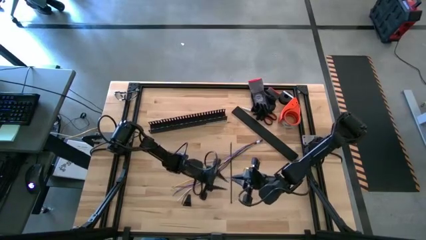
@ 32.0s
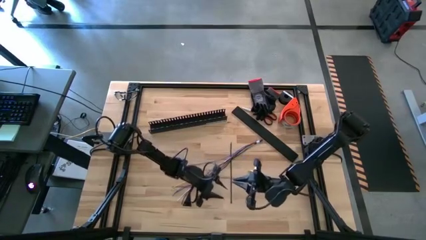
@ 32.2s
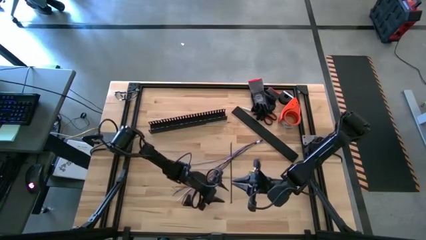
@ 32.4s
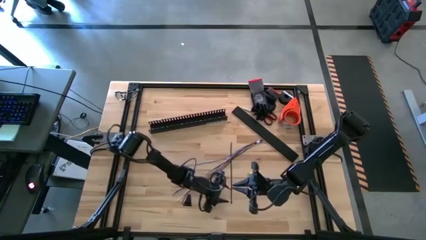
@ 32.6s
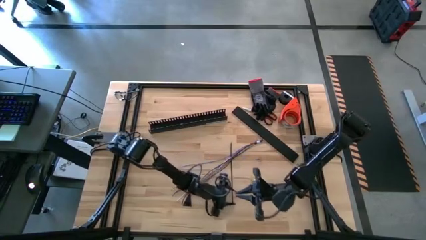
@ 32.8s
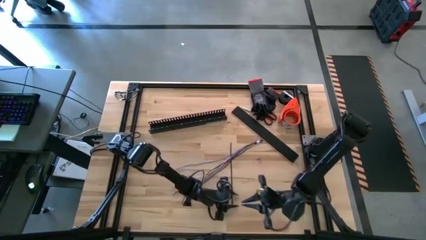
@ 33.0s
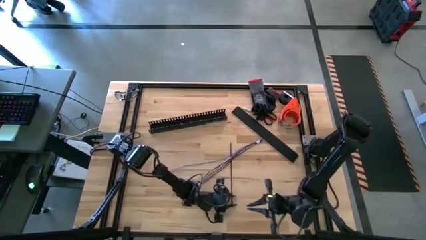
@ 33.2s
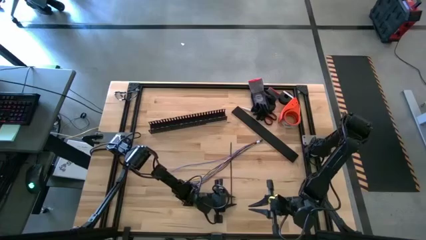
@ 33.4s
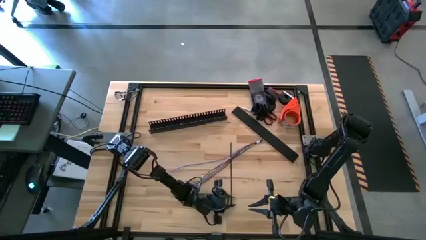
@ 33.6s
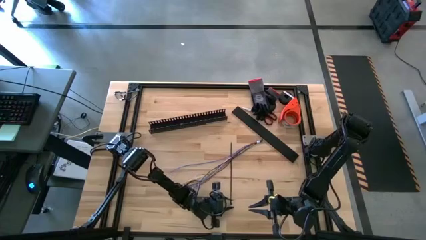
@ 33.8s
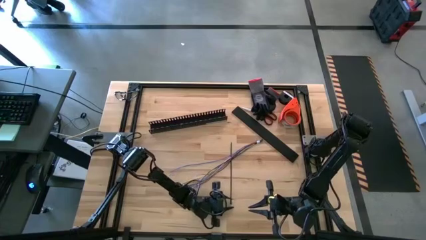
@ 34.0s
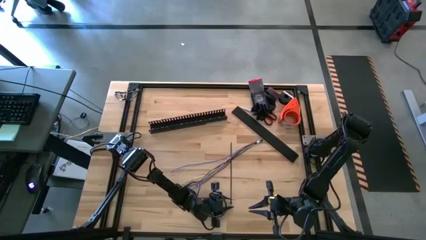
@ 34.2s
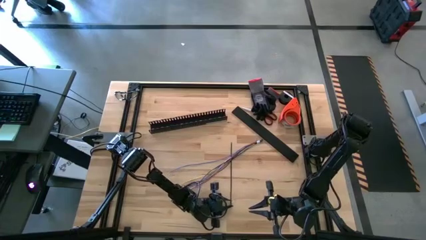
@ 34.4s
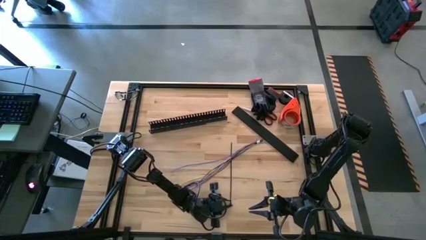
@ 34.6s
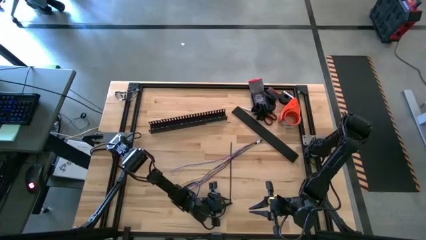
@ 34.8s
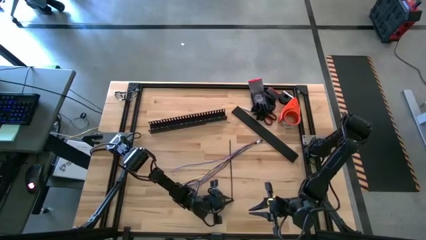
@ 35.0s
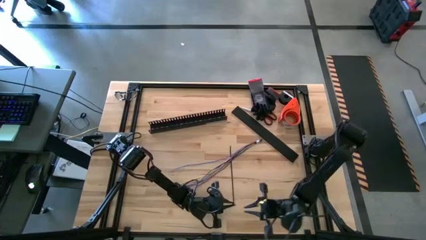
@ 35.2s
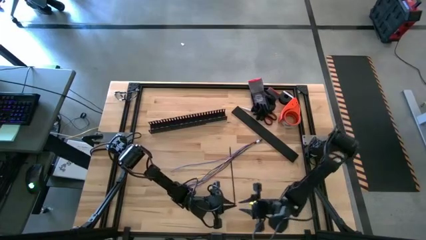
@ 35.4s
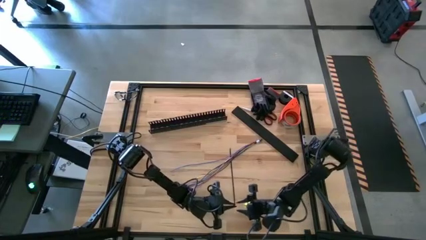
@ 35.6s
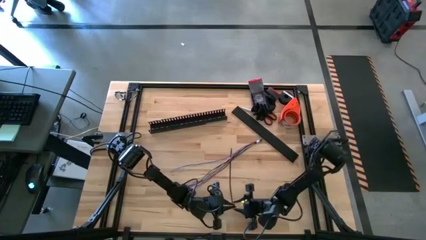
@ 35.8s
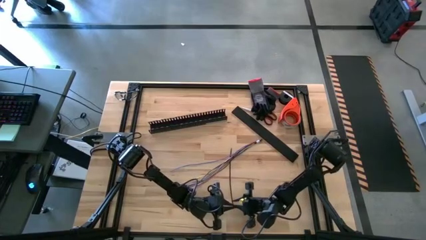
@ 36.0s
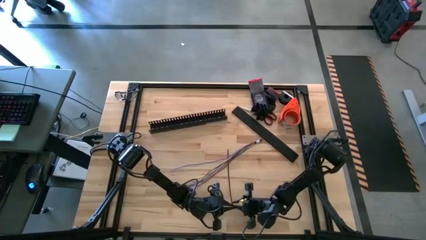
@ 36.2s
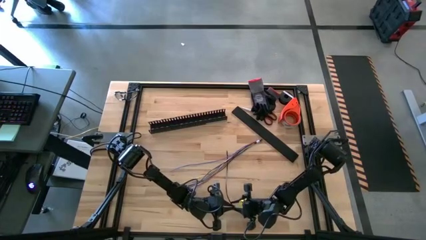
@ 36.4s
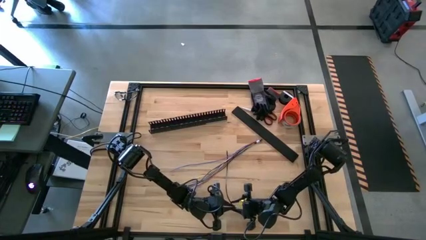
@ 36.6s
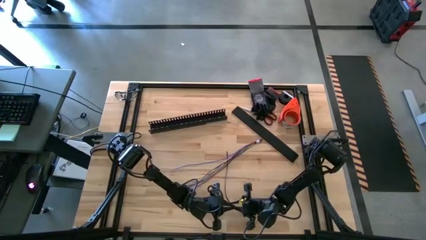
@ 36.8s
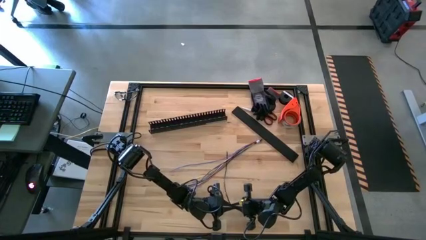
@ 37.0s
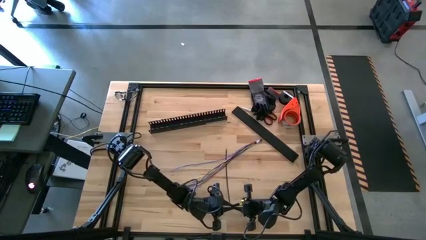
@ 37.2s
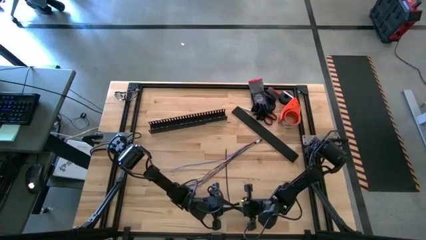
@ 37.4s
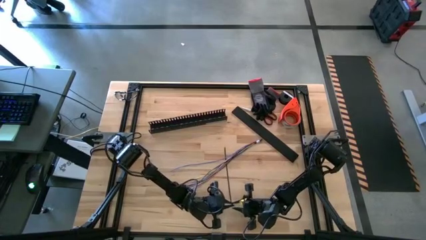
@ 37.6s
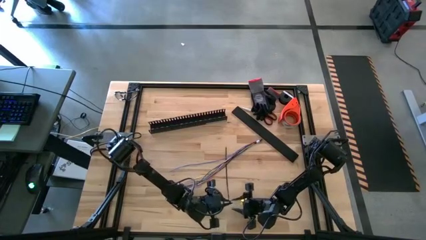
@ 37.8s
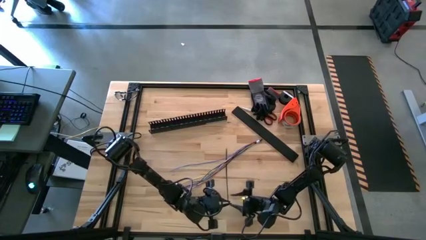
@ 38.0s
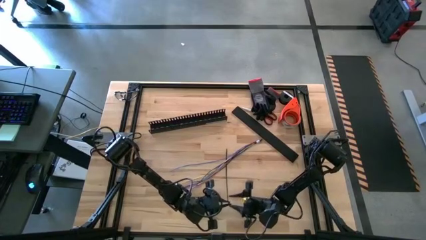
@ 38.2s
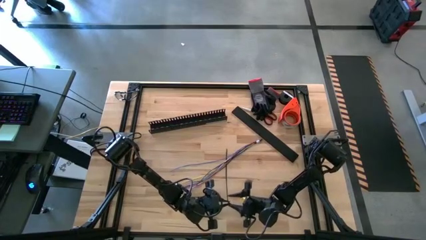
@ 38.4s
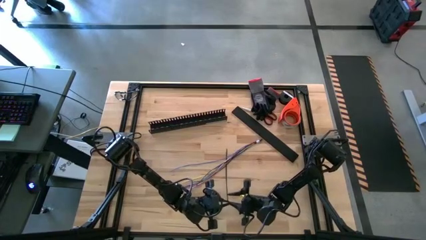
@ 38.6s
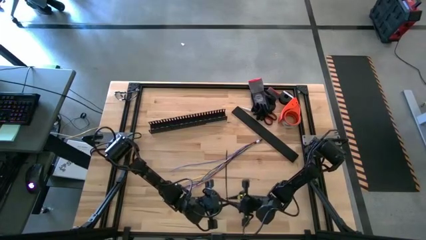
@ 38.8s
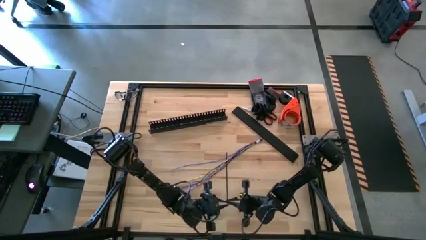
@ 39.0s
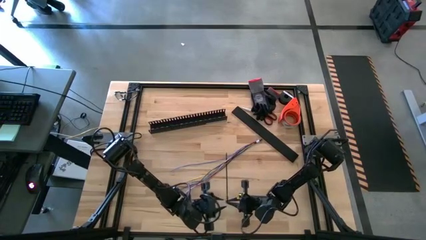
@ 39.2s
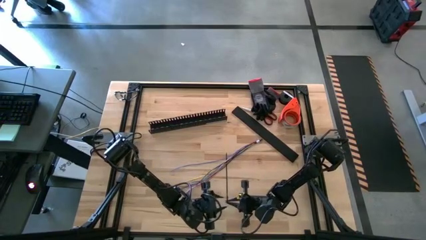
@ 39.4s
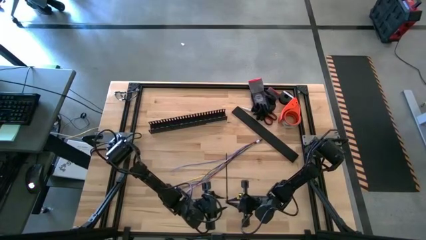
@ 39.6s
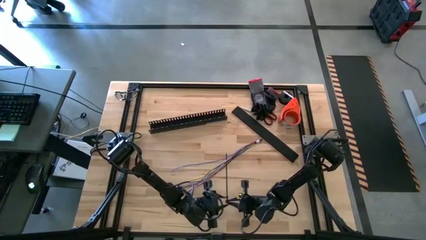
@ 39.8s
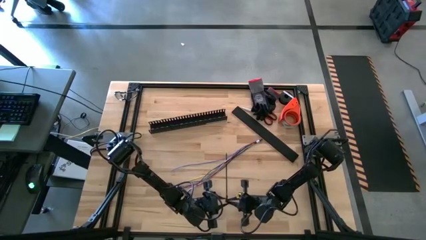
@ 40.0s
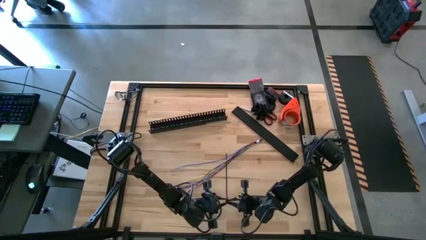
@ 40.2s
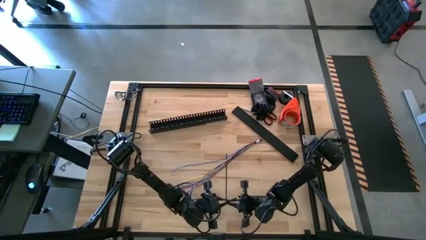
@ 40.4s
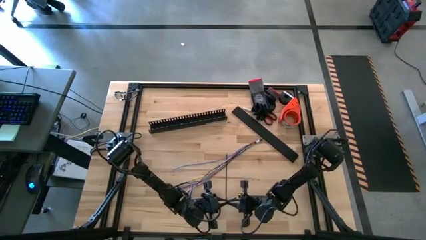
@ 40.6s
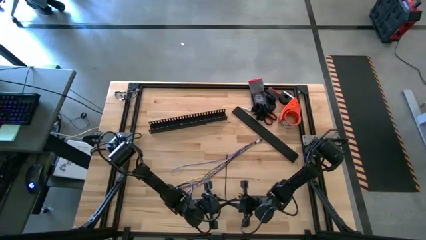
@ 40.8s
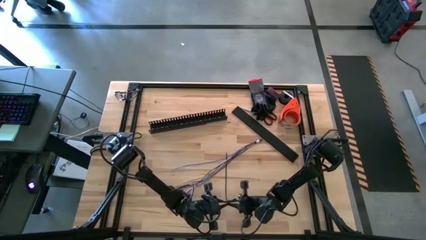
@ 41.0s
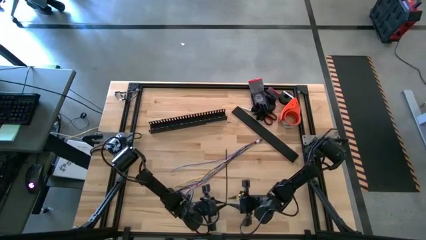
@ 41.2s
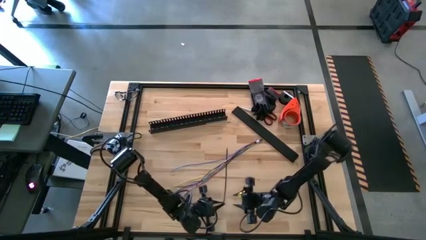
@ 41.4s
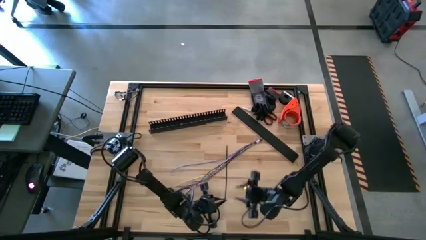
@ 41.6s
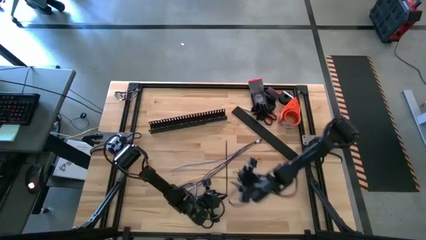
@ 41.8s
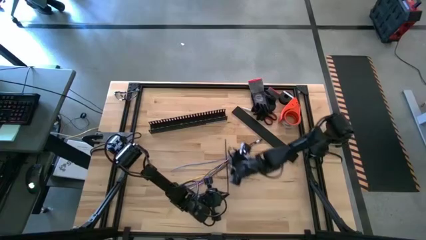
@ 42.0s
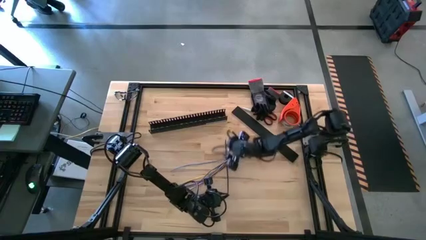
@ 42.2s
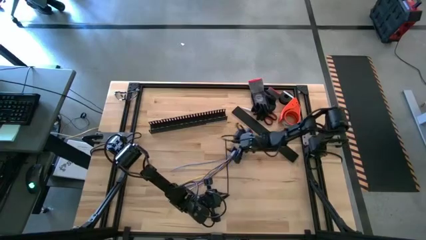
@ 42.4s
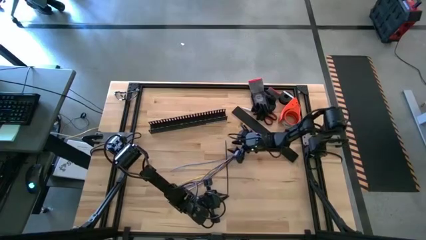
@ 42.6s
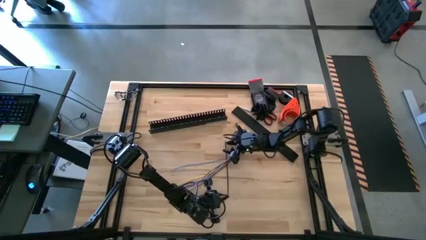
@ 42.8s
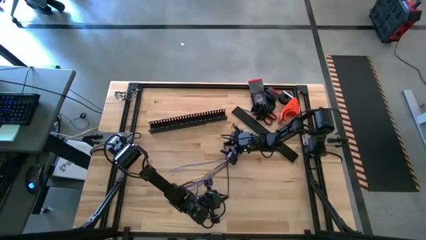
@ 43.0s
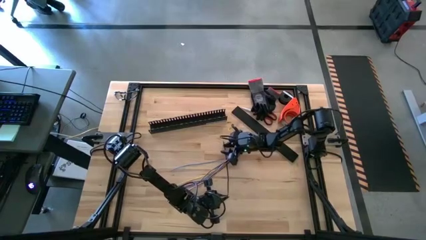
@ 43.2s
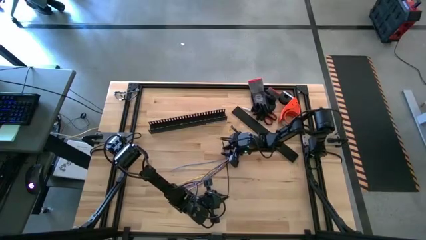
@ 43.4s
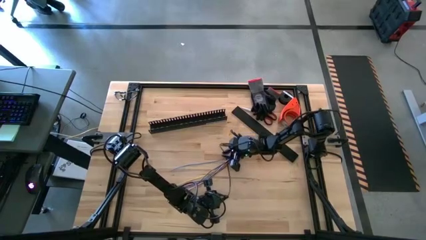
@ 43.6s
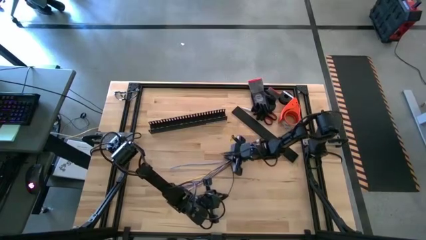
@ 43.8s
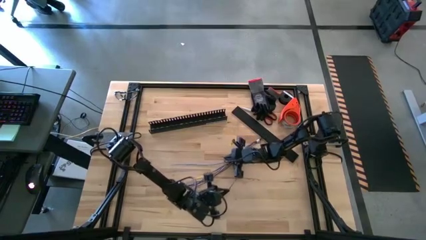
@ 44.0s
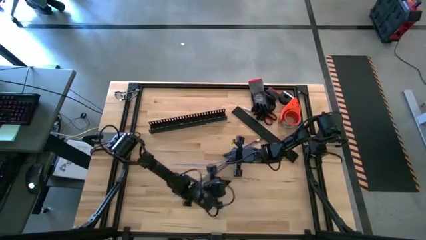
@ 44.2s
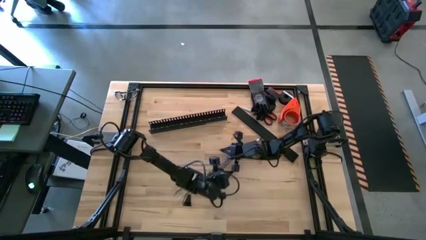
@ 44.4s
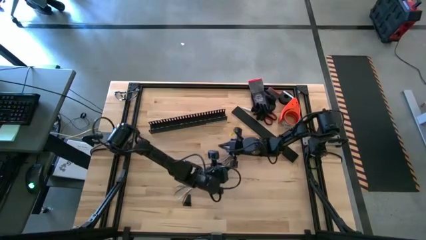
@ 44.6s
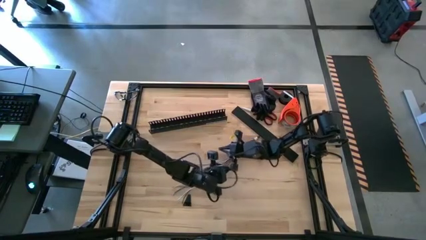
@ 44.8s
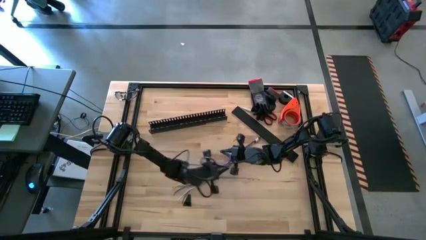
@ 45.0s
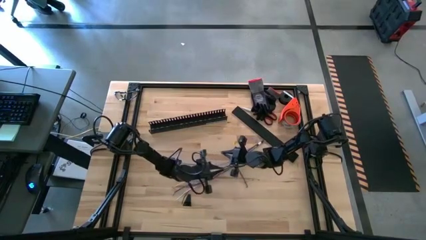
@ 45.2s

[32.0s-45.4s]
Task: Ziptie cables
Wrap the colored cables together using a zip tie

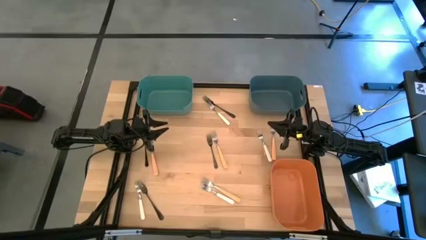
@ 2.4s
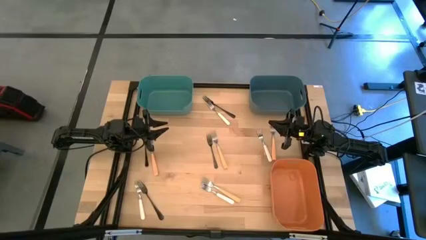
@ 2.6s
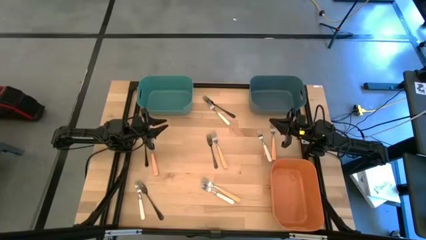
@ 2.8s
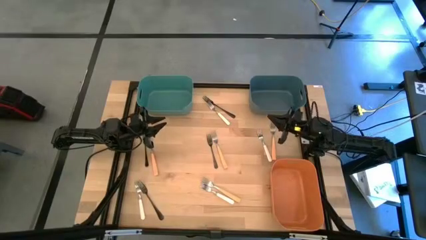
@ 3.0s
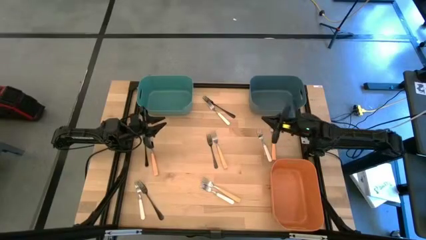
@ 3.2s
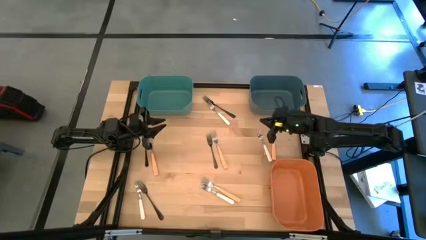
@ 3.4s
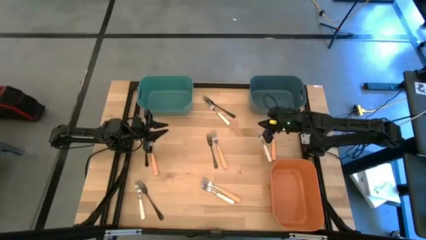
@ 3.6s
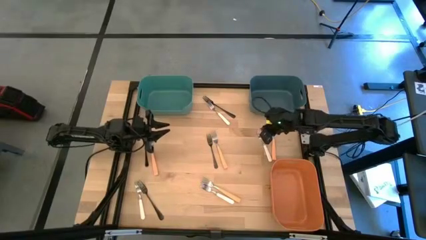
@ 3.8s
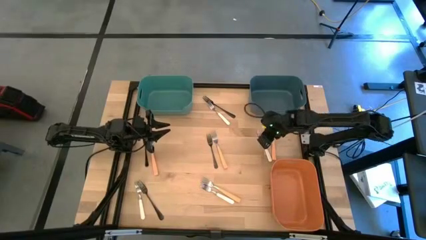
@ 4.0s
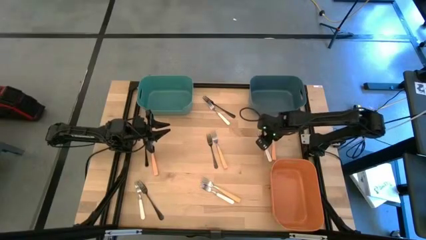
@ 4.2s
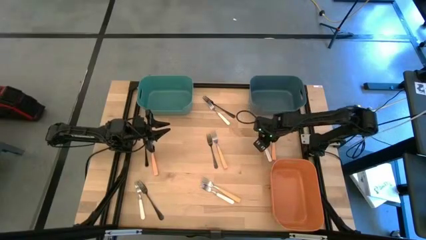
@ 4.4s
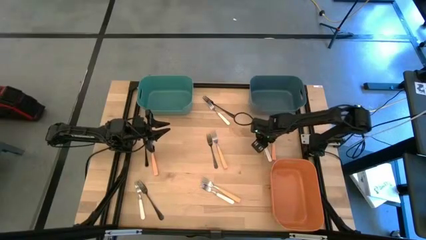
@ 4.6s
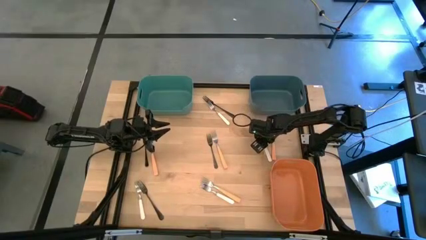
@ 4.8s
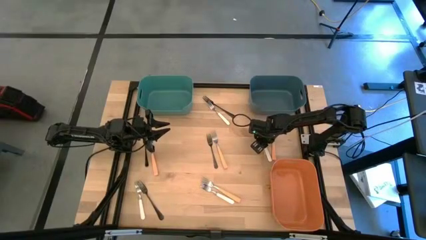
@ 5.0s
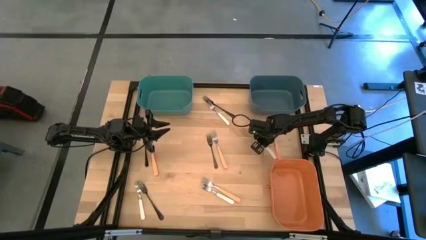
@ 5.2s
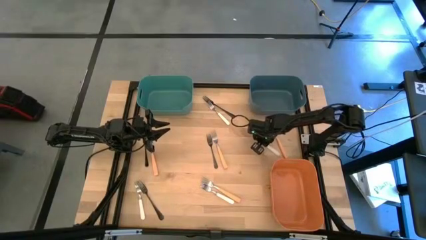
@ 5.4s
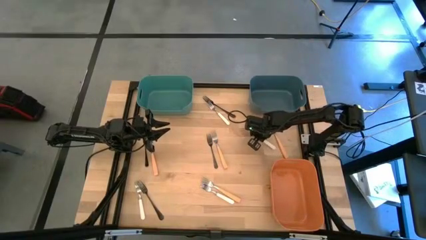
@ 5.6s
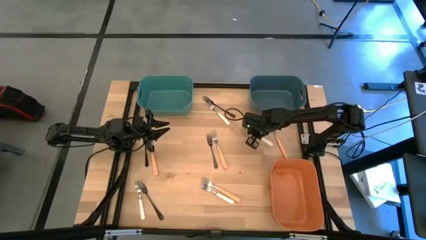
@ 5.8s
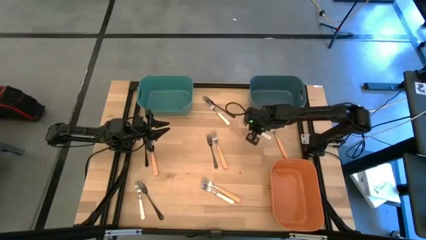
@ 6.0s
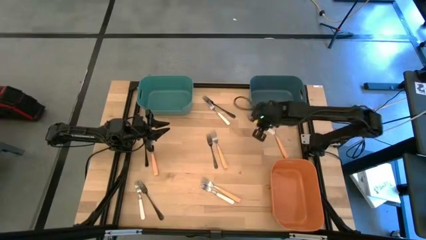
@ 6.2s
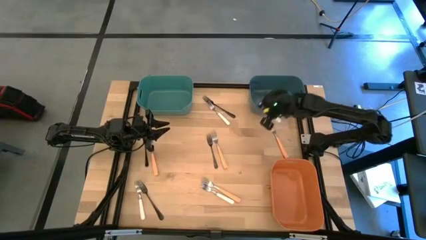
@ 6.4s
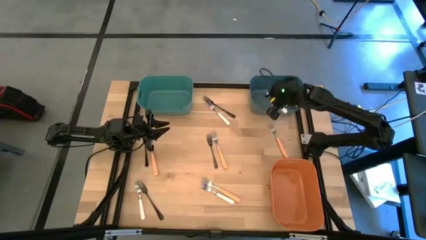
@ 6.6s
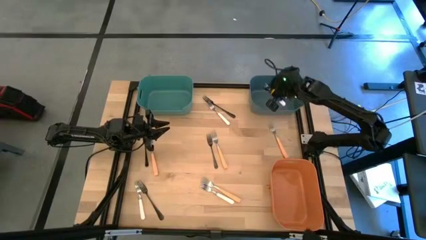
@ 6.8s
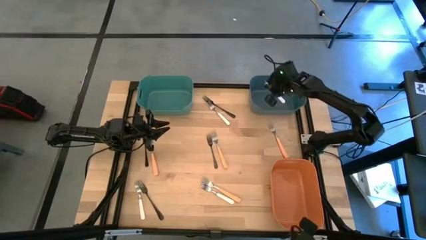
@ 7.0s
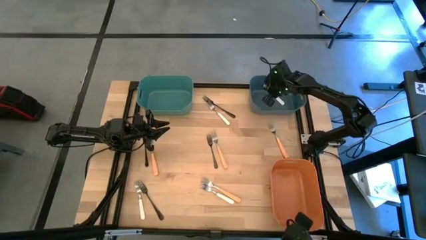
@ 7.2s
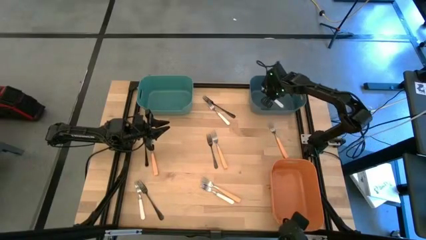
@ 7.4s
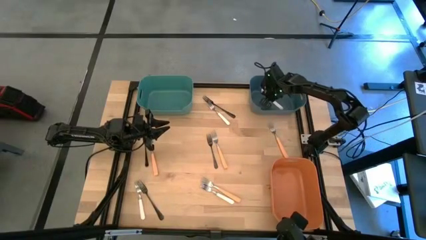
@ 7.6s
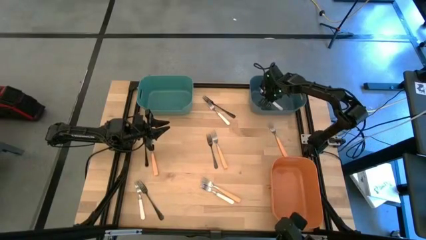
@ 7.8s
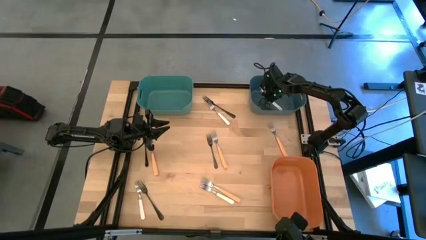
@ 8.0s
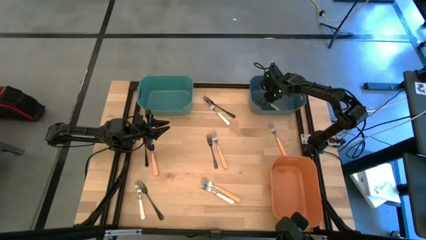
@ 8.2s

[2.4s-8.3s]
Task: Sort silverware by color (type)
Put the white fork into the blue bin
